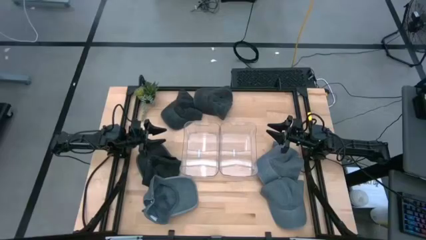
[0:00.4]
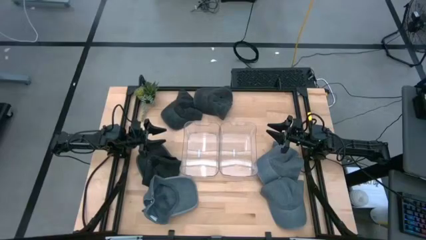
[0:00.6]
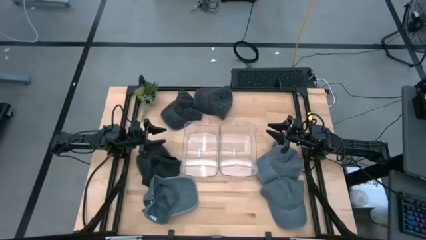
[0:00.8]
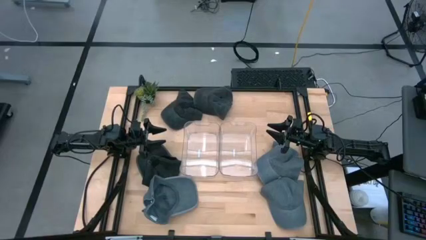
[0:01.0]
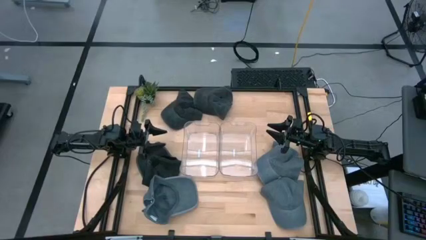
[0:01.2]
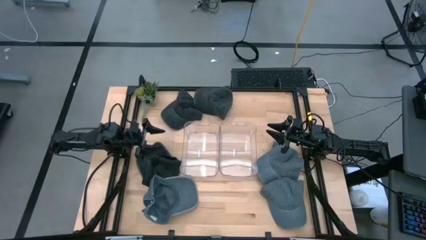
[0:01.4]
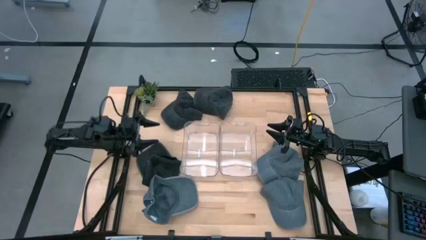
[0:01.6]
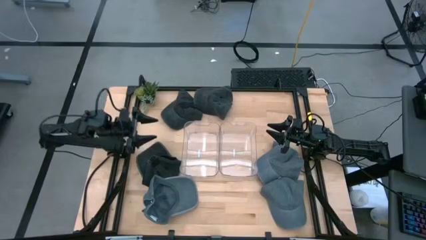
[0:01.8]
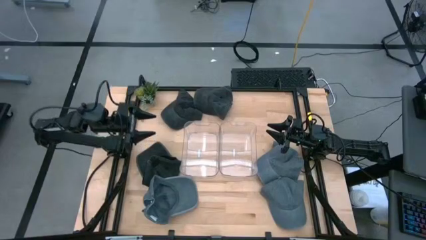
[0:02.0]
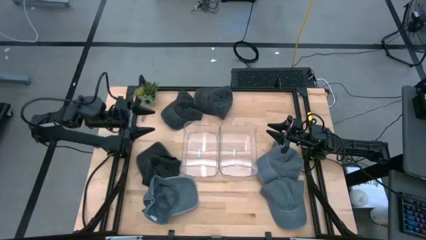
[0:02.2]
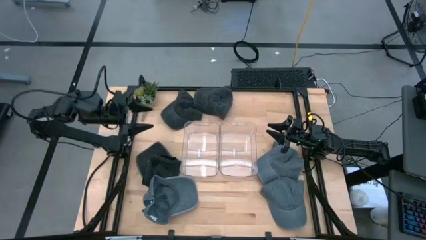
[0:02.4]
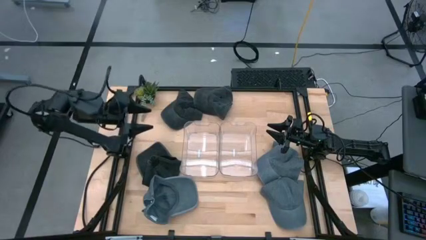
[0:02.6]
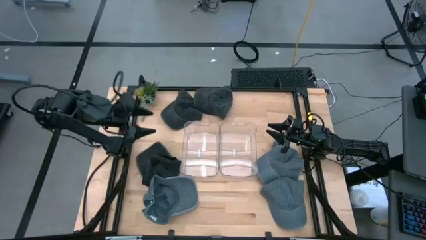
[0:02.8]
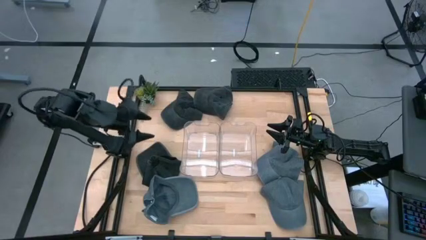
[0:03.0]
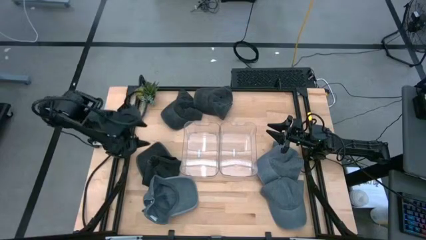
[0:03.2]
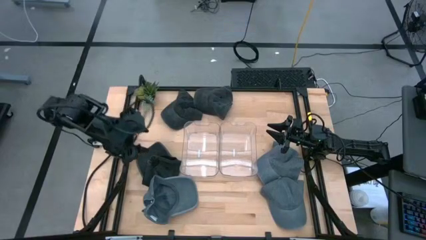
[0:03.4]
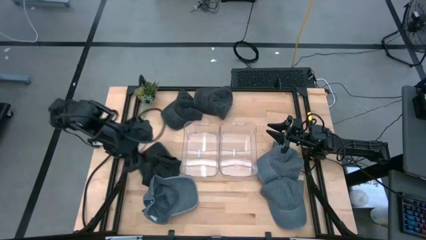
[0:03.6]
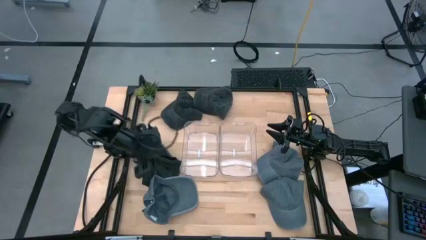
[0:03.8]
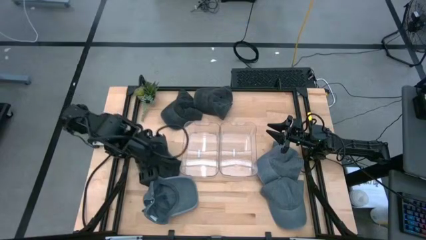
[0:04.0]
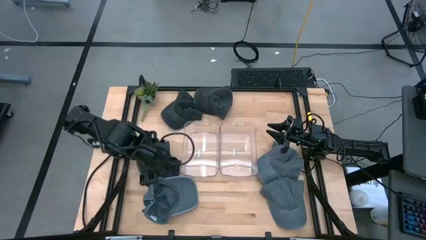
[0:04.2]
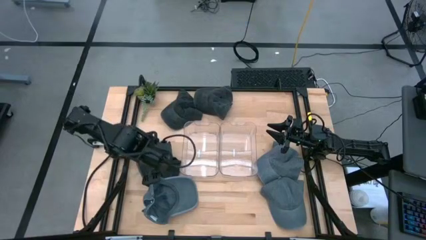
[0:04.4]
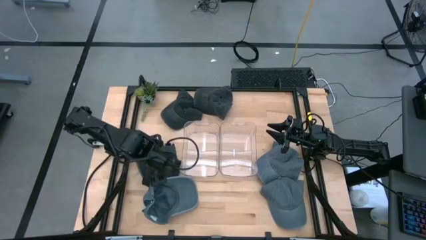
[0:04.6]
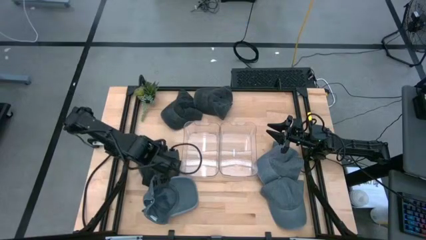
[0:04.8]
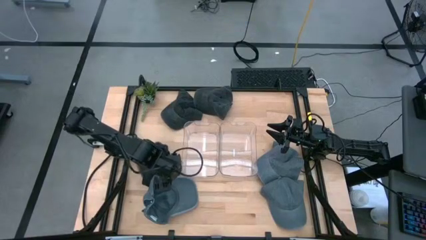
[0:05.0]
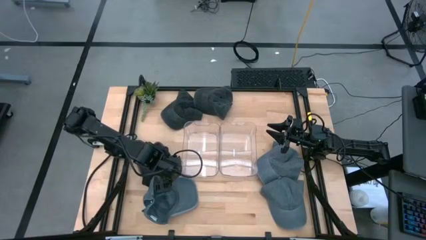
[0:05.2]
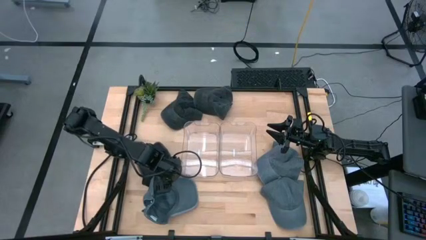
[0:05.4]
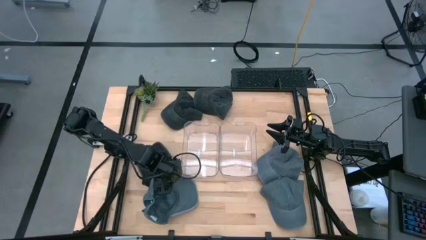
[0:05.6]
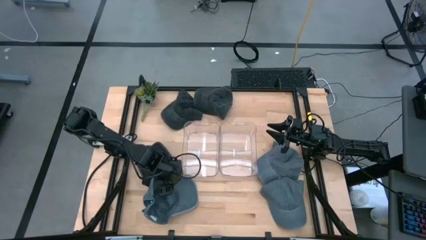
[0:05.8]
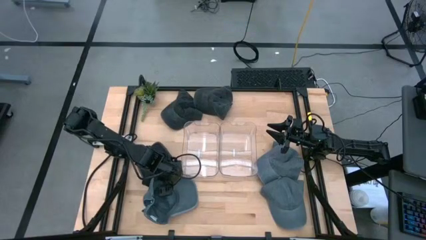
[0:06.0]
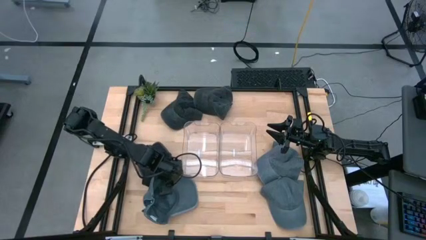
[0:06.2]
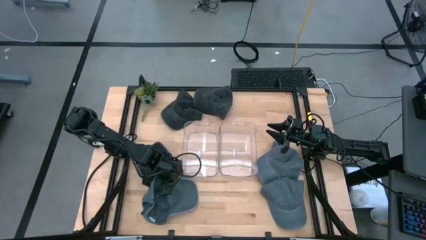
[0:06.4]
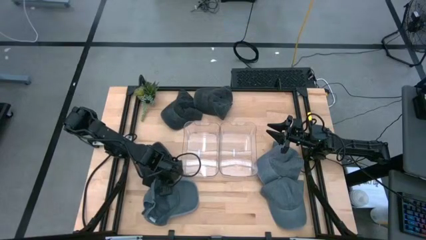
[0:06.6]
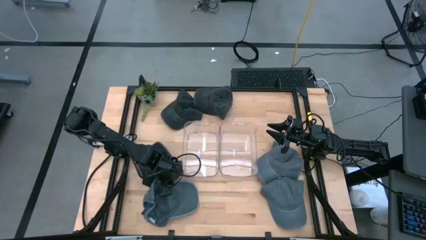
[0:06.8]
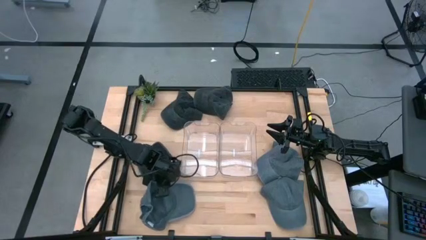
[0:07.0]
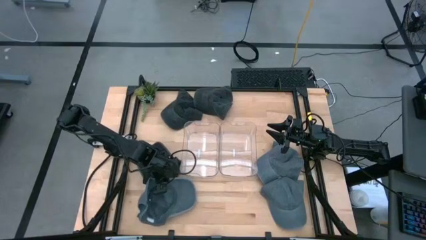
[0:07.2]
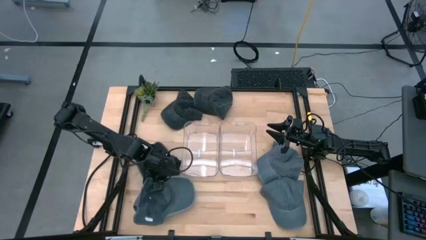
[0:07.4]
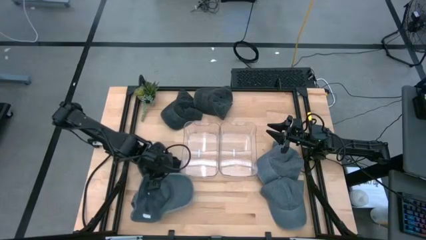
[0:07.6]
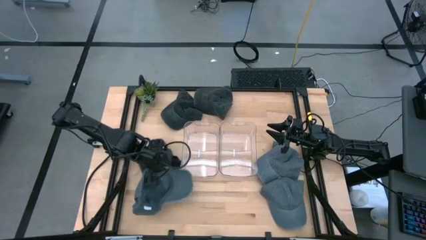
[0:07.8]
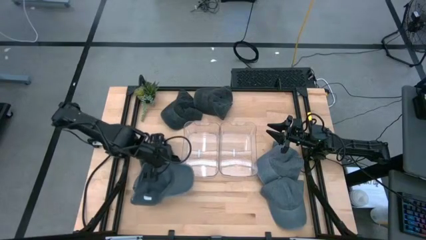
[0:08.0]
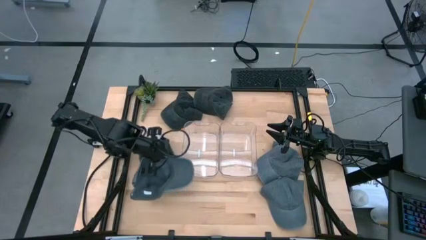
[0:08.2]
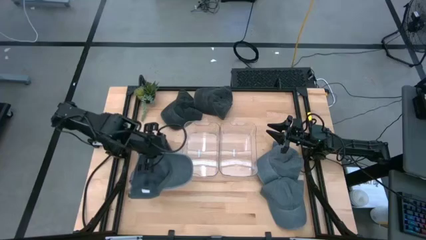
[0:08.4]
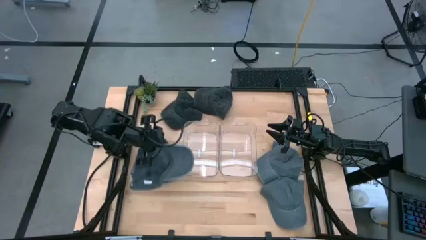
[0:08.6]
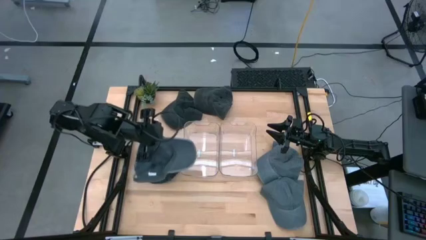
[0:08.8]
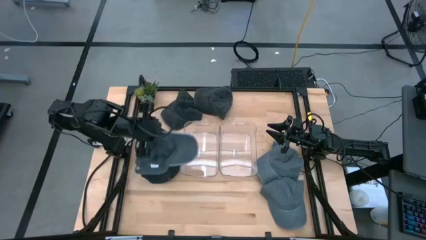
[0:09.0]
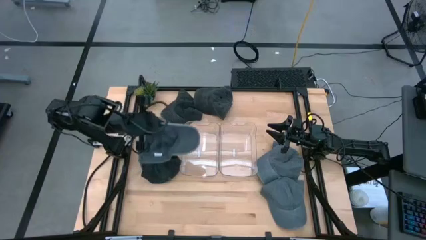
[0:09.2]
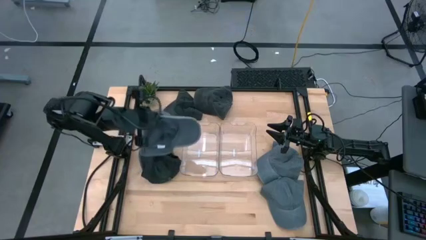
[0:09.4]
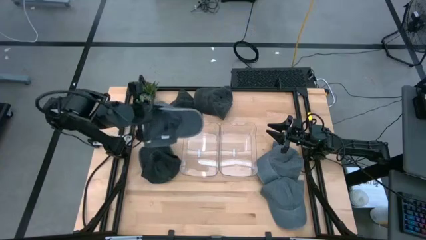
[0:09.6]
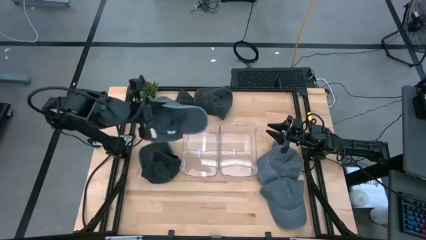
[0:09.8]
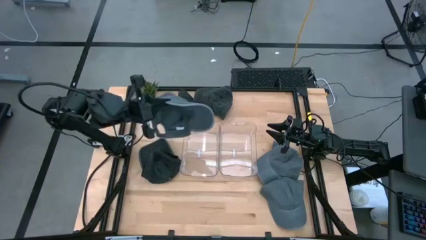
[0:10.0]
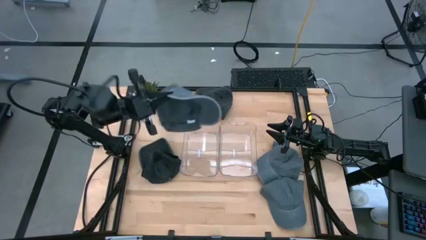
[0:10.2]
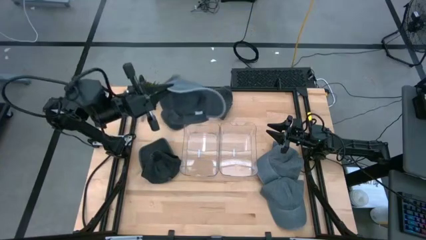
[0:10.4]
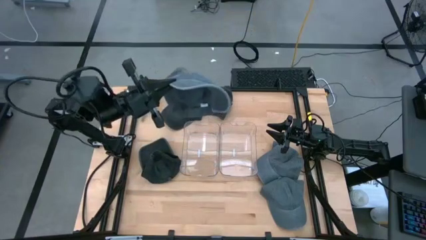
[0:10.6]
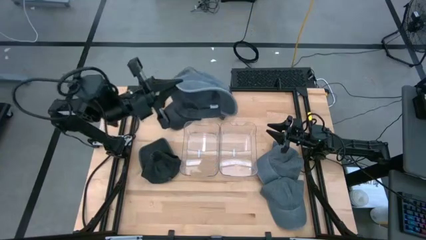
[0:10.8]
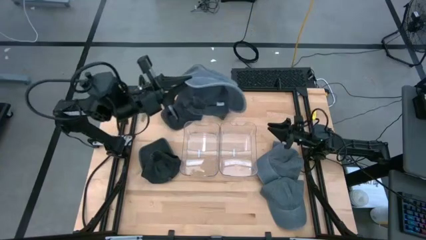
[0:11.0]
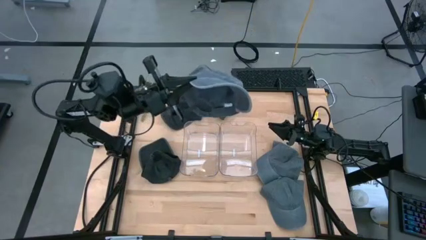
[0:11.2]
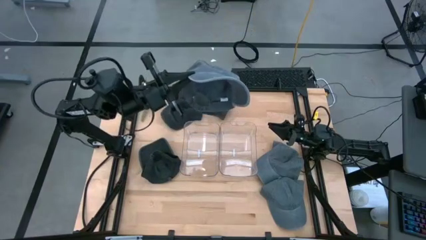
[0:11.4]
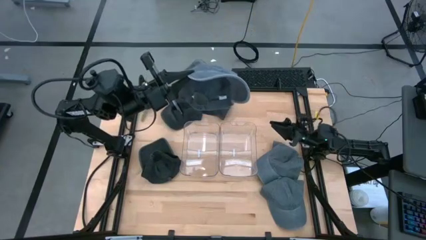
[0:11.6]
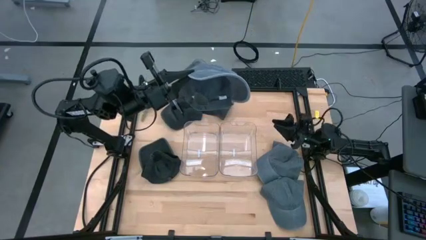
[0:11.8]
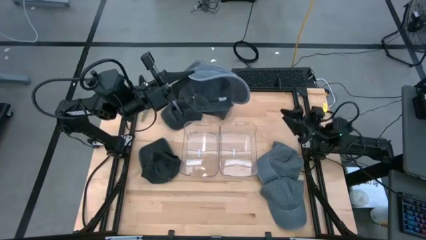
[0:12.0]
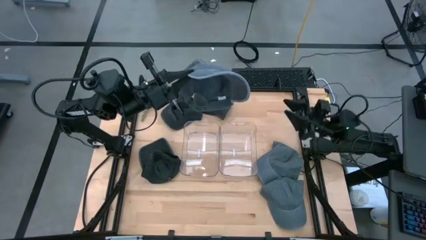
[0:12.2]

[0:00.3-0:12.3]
Task: Pick & Place hat
Put the bottom left gray cap into the left transparent bin
